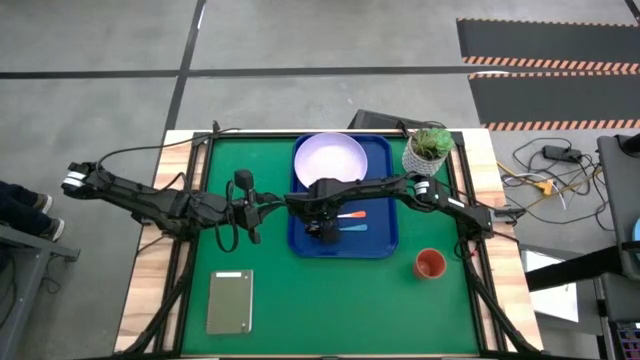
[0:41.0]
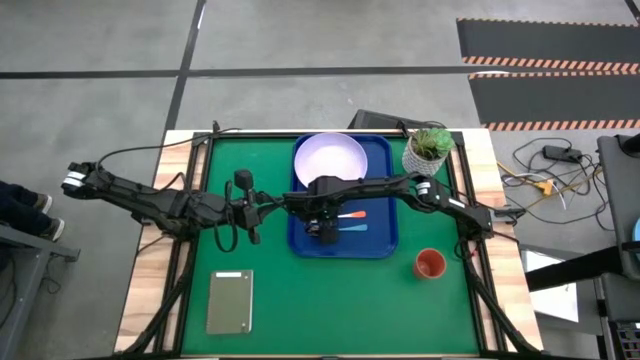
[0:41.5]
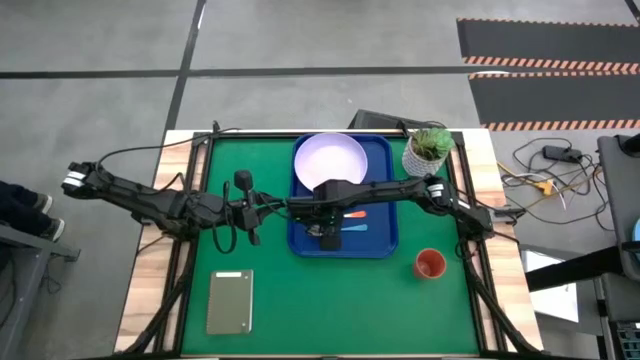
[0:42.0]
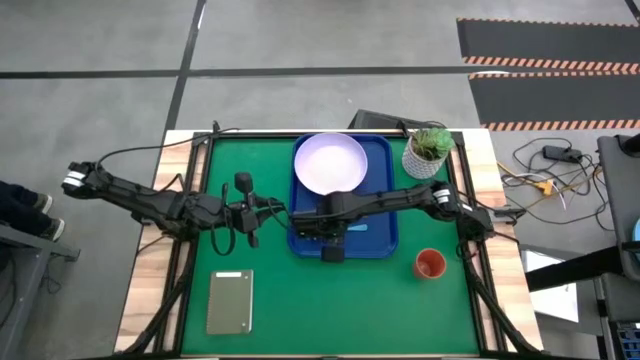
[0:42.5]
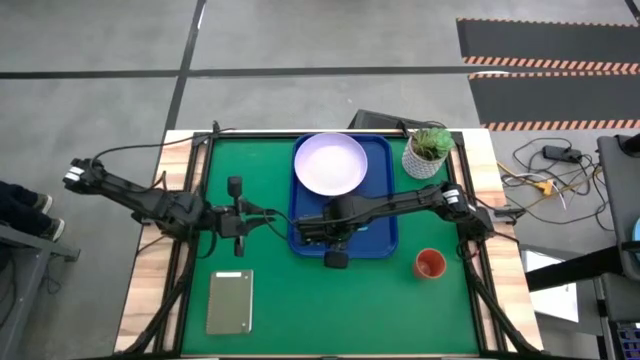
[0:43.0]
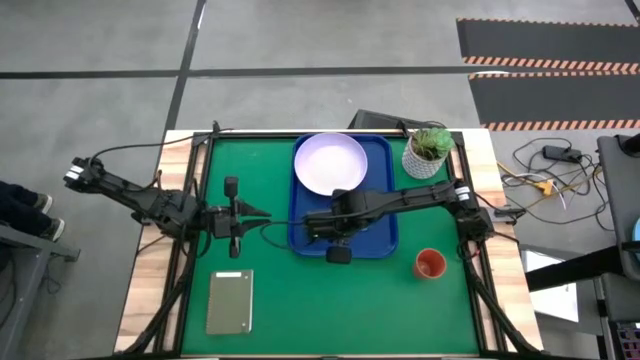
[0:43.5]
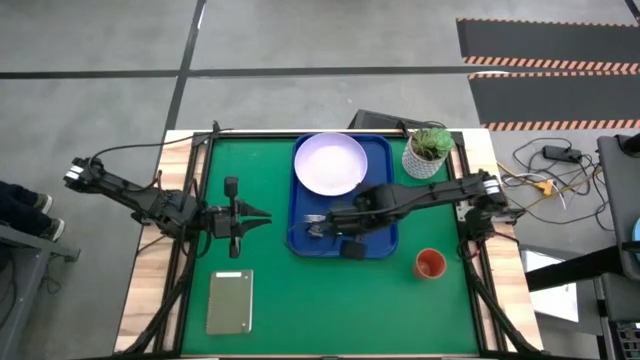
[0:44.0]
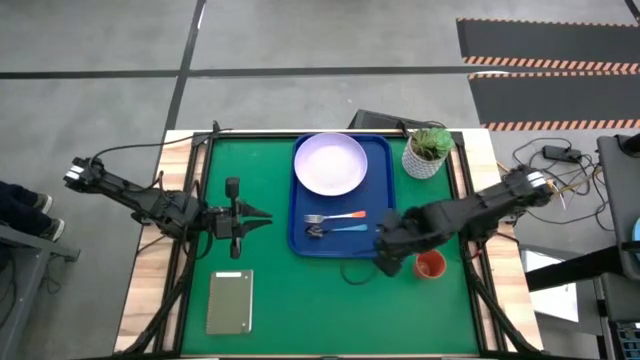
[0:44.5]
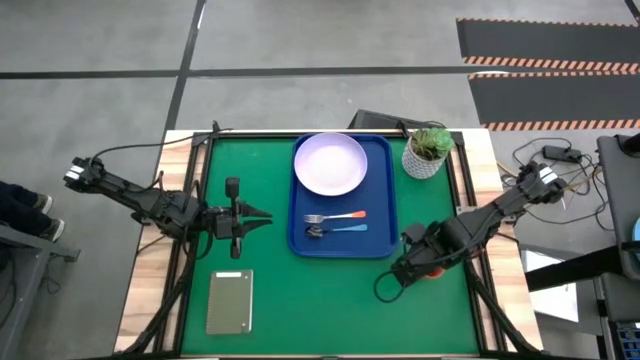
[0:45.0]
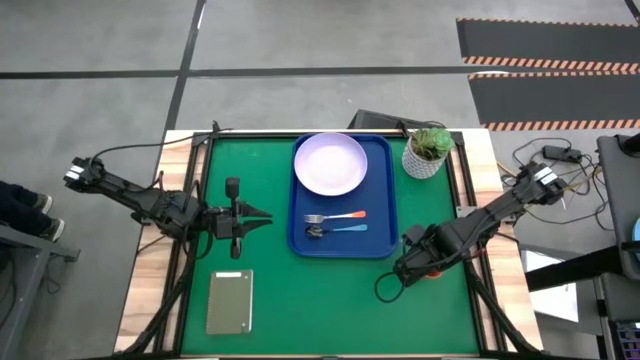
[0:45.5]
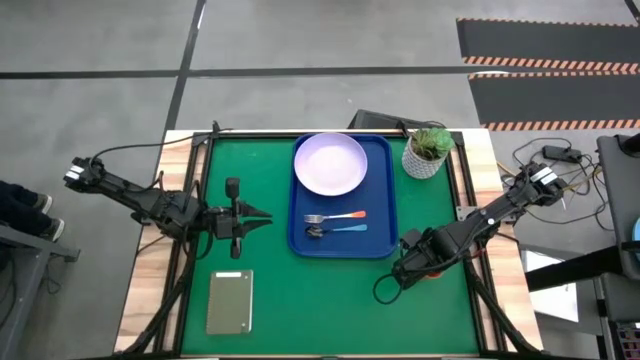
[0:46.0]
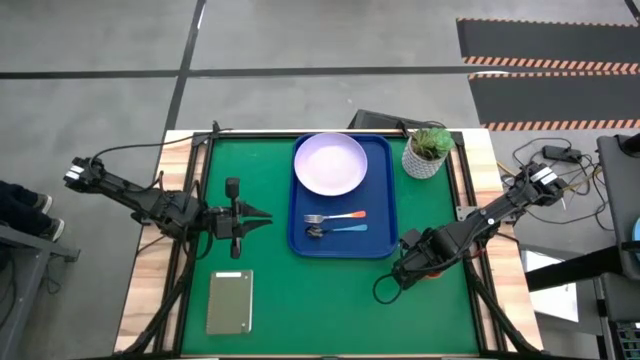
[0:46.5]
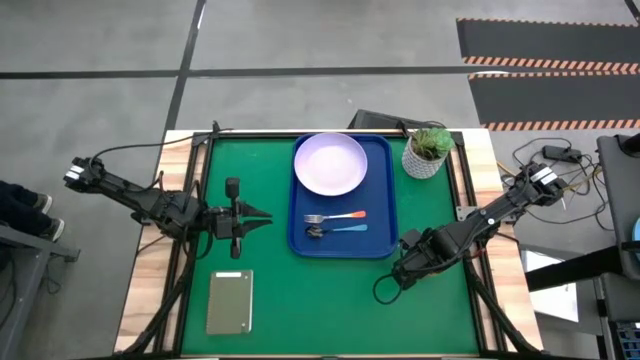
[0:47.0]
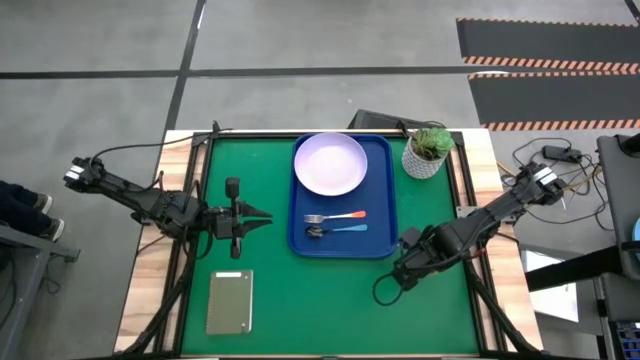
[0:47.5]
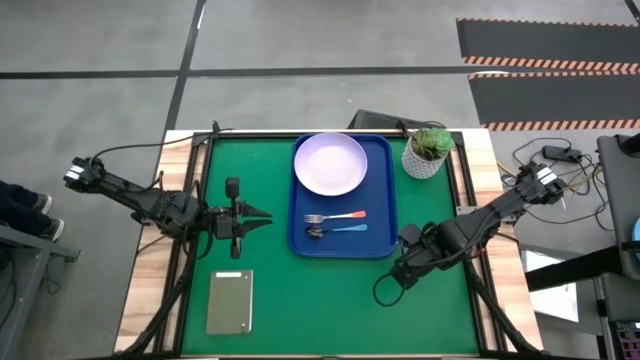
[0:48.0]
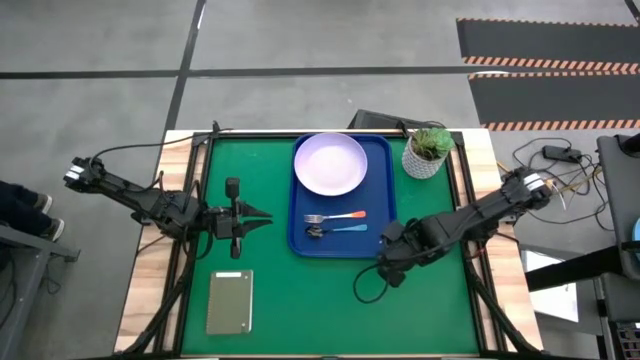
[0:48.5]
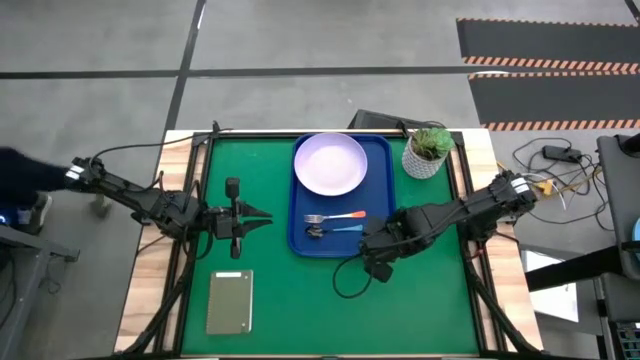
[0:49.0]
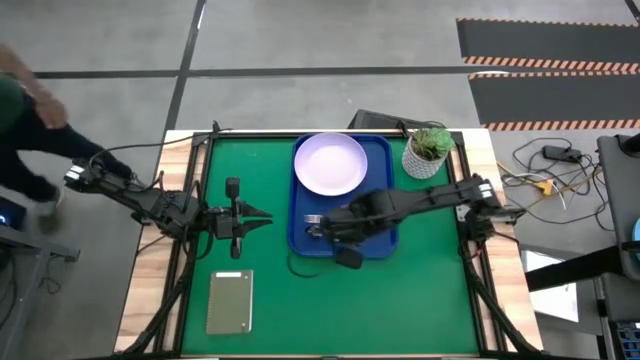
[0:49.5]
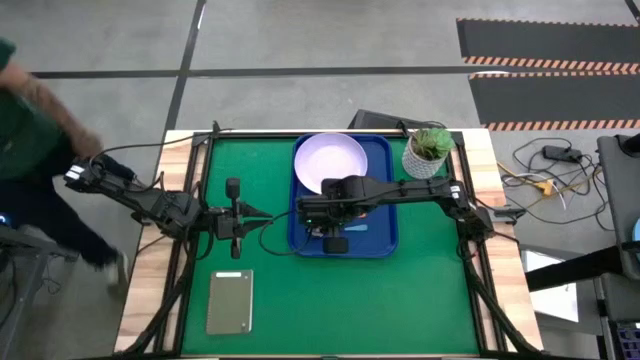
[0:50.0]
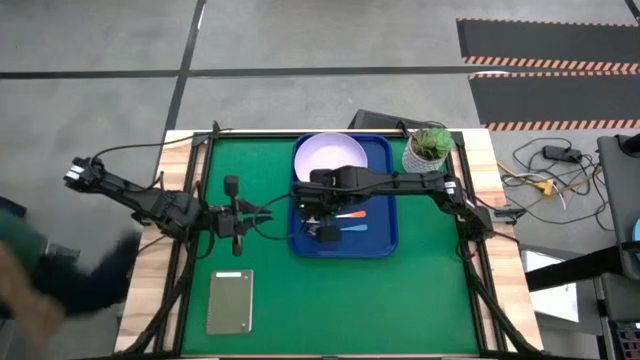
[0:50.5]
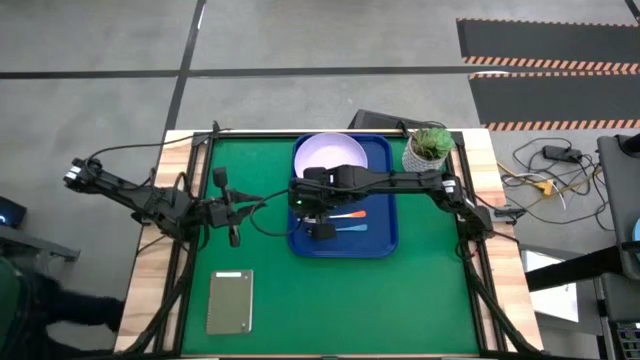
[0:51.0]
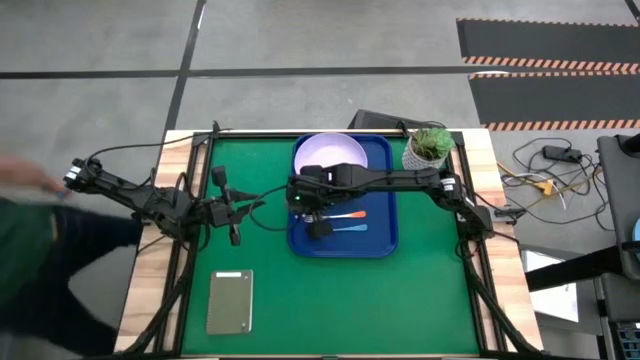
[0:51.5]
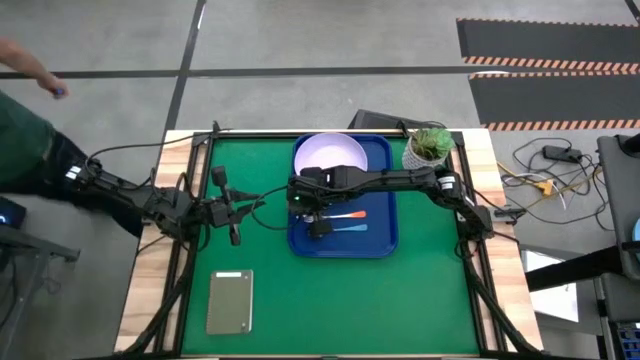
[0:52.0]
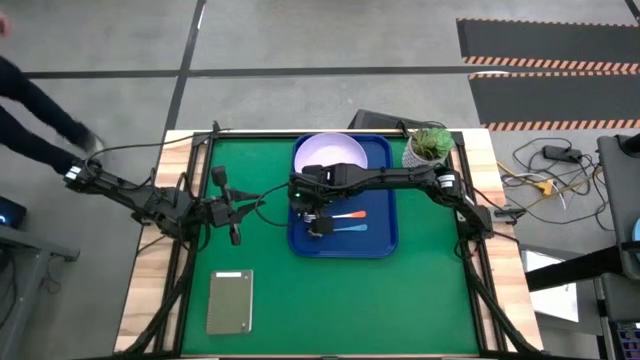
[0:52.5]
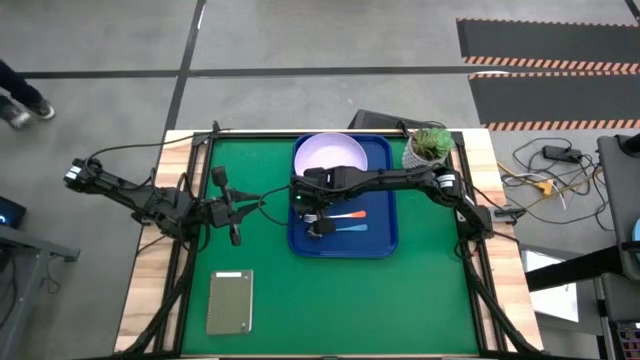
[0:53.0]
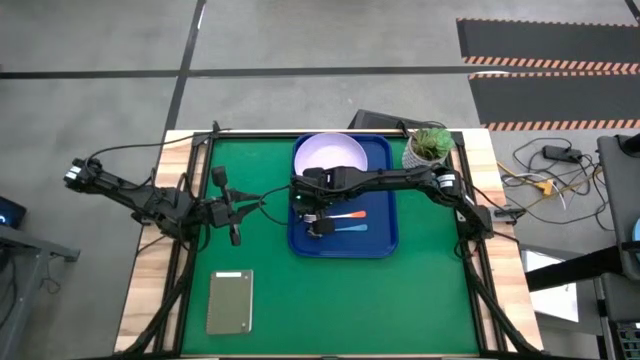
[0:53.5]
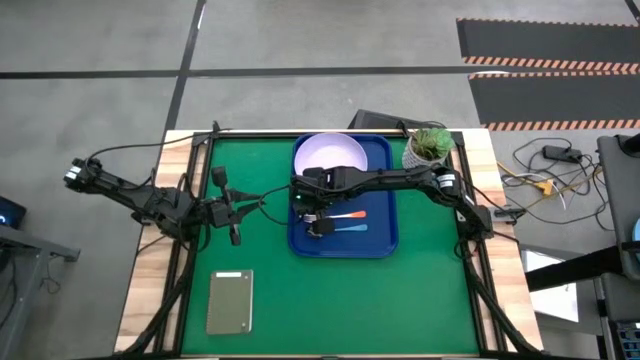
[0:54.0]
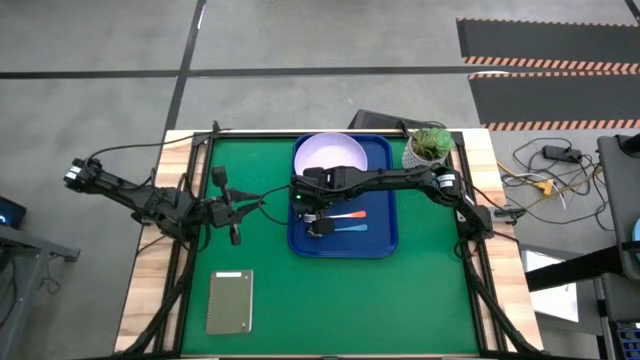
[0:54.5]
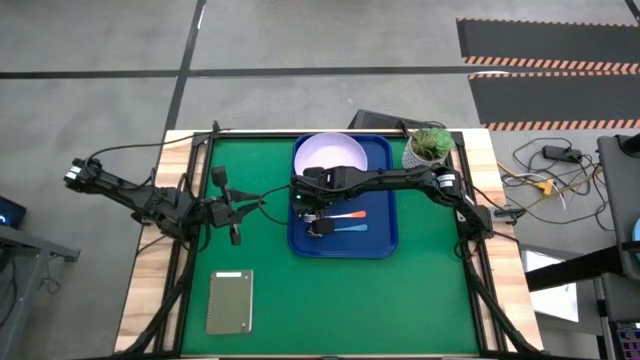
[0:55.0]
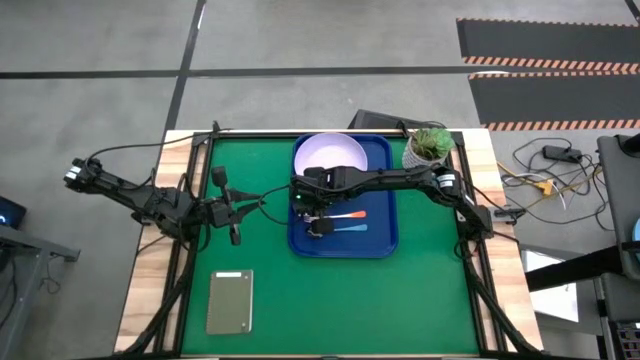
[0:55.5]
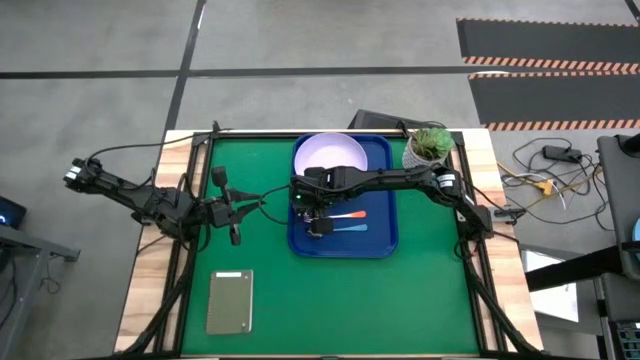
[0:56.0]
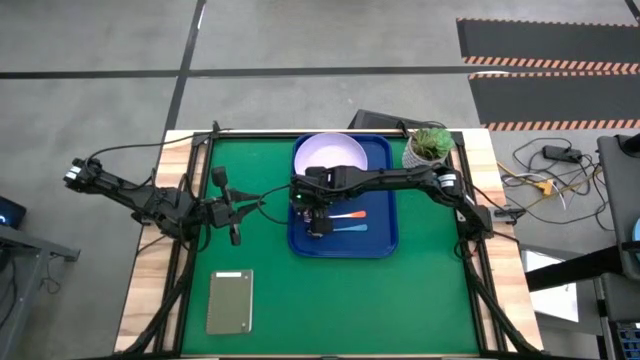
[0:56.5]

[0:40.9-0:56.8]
Task: Pick and place plate/cup/fork/spoon on tray
Put the orange cup on the blue serving tray to the top left of the orange fork

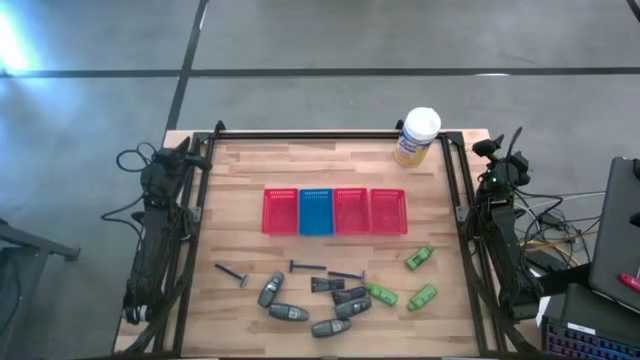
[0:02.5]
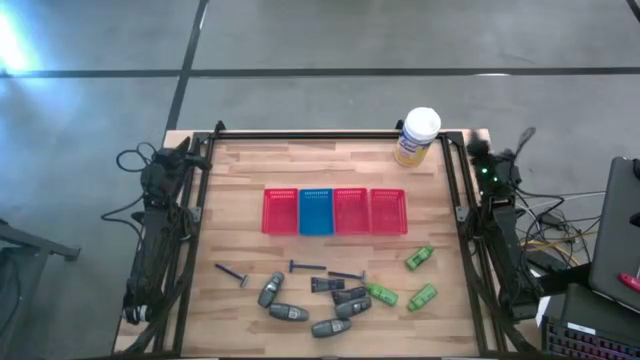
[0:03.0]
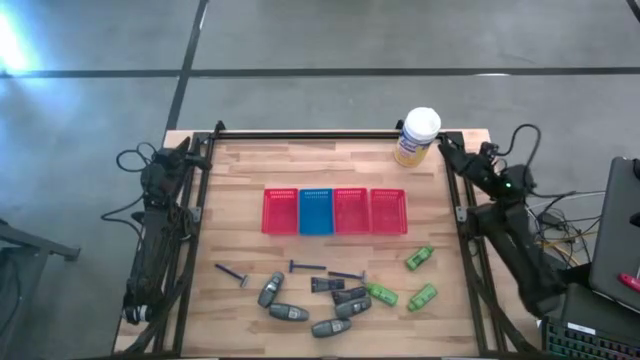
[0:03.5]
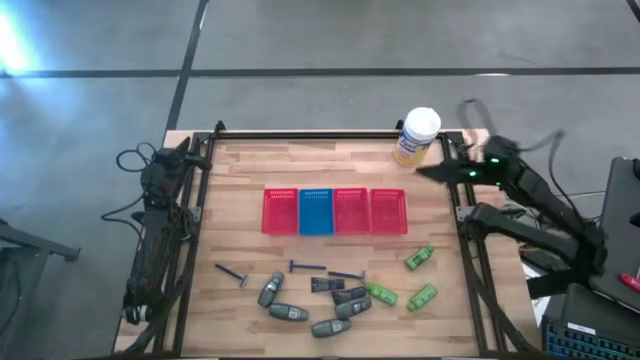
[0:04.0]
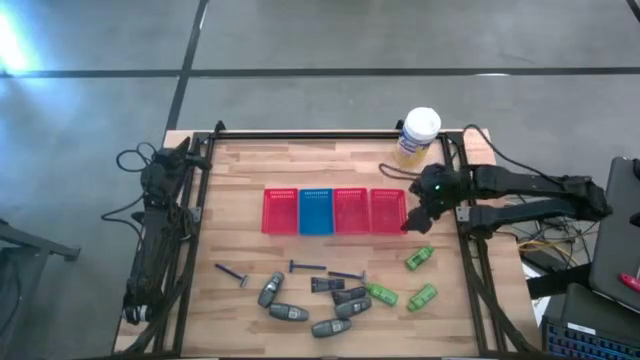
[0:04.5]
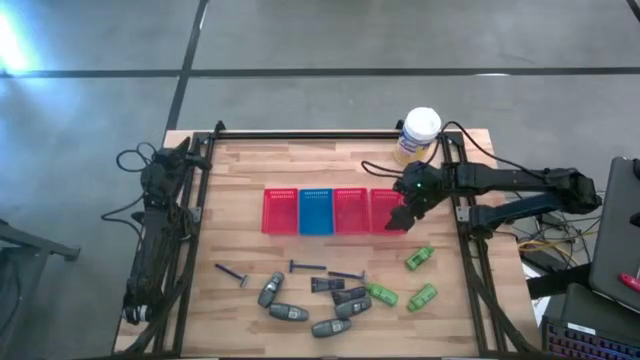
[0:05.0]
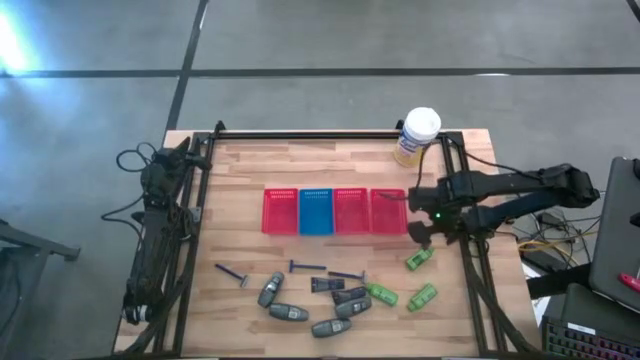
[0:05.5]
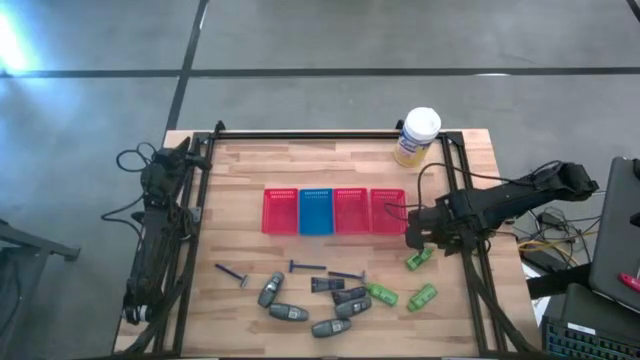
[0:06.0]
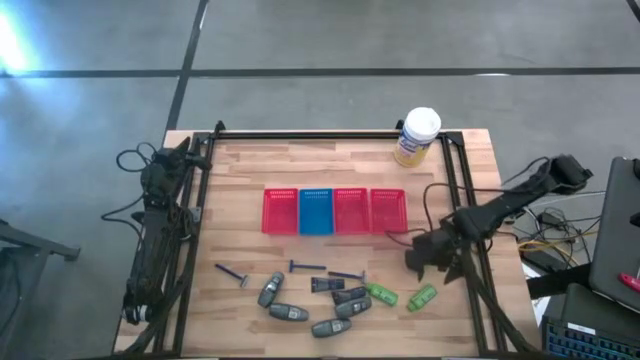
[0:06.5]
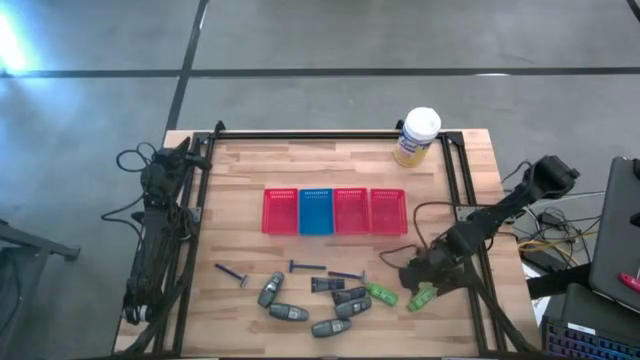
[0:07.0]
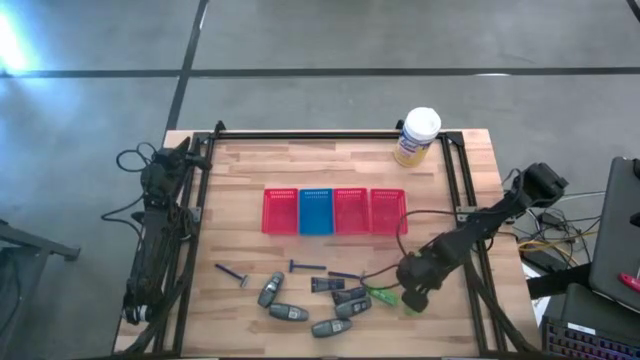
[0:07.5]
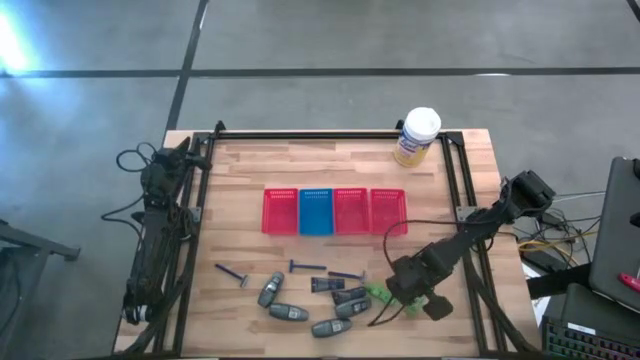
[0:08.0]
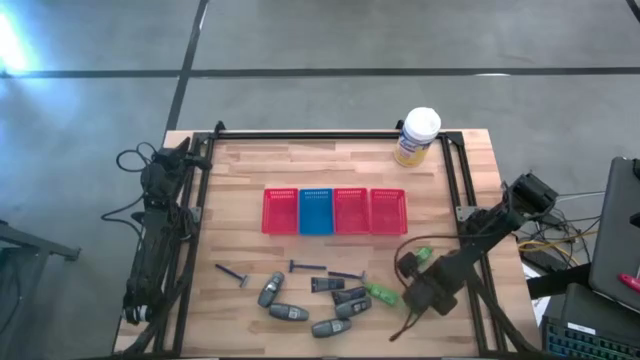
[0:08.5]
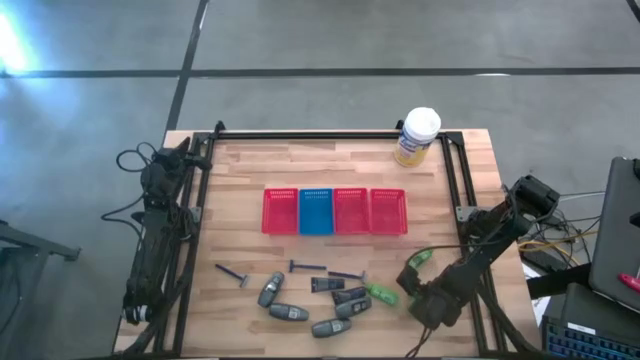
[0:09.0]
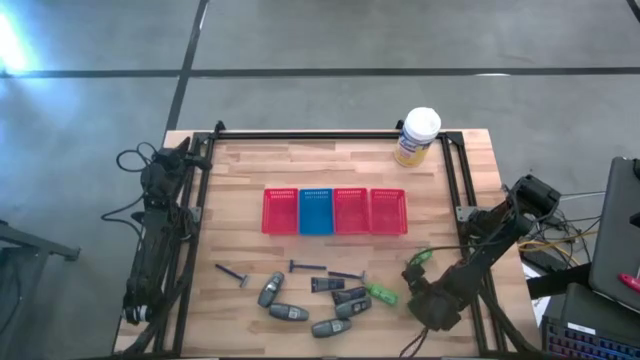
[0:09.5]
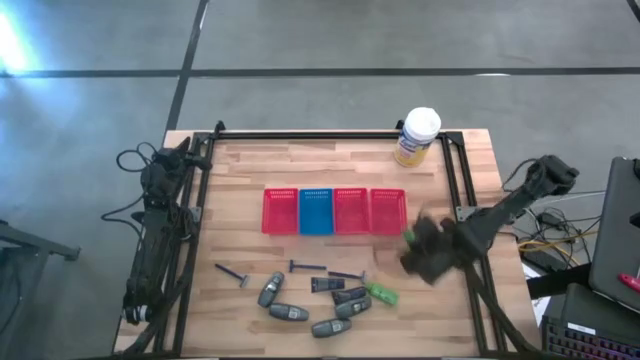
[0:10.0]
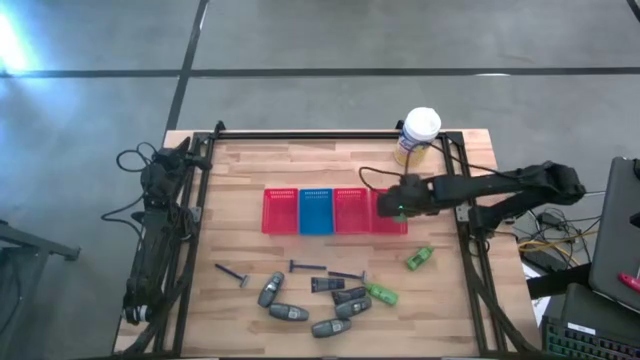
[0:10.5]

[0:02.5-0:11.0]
Task: Pick & Place Travel size toiletries
Put the green shampoo into the right red bin
